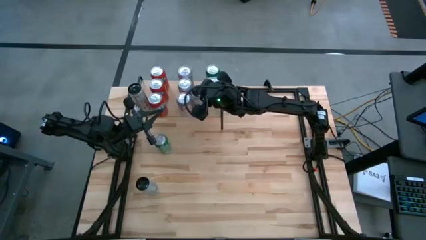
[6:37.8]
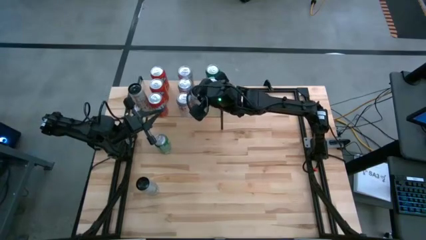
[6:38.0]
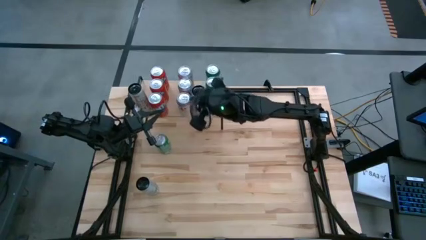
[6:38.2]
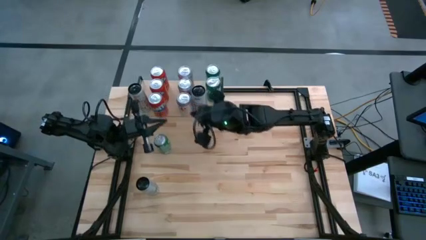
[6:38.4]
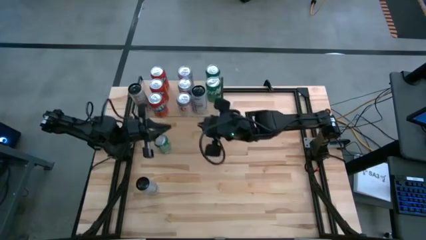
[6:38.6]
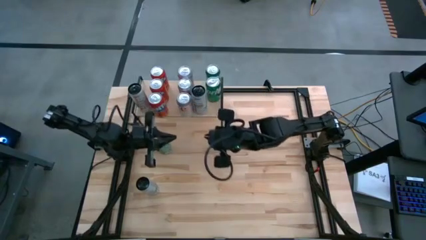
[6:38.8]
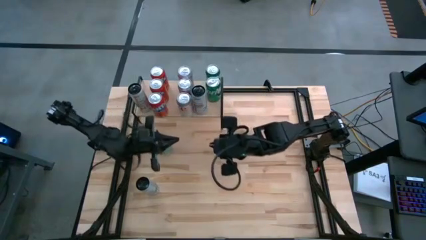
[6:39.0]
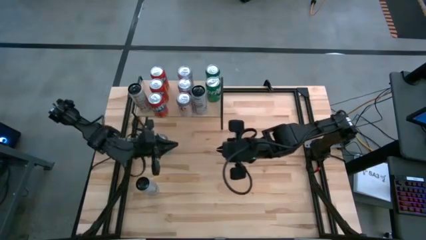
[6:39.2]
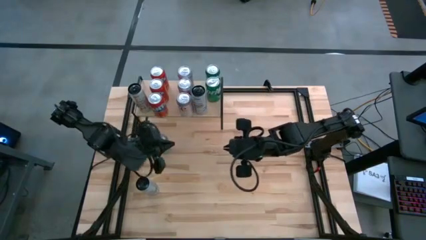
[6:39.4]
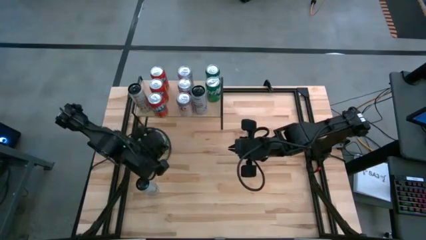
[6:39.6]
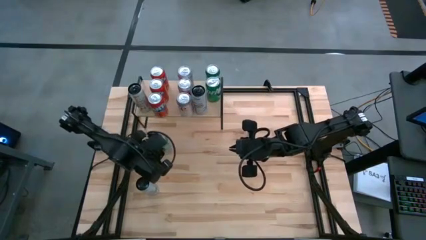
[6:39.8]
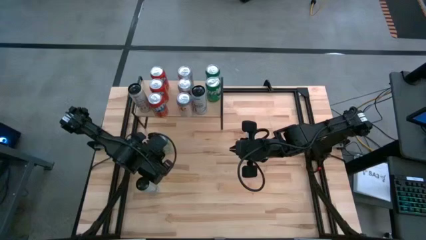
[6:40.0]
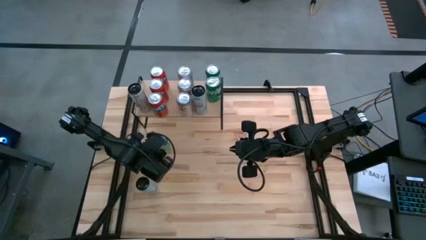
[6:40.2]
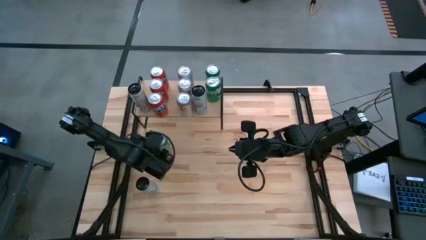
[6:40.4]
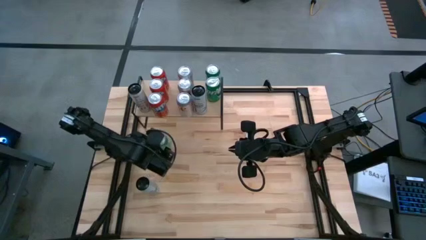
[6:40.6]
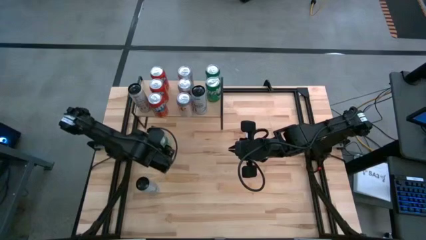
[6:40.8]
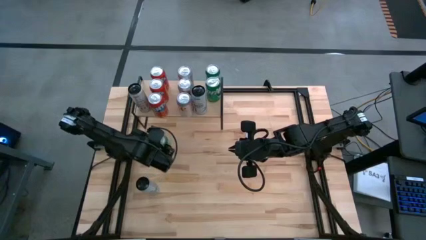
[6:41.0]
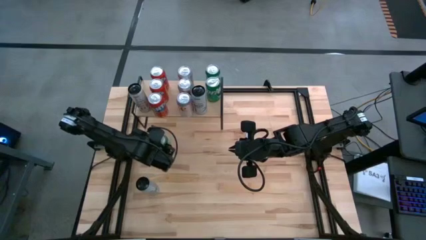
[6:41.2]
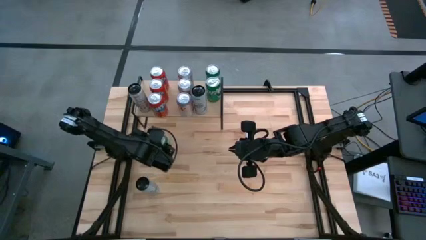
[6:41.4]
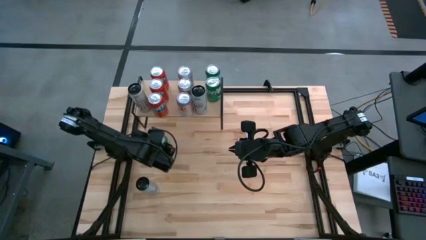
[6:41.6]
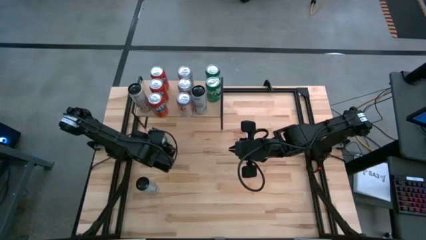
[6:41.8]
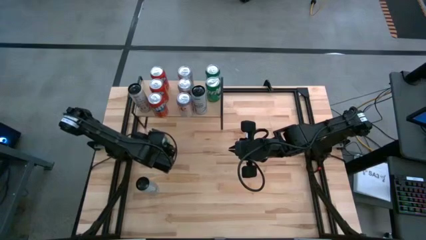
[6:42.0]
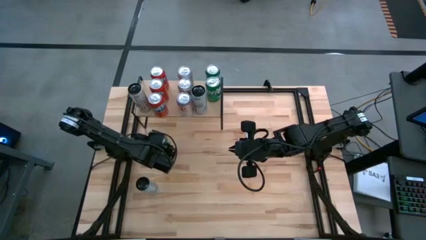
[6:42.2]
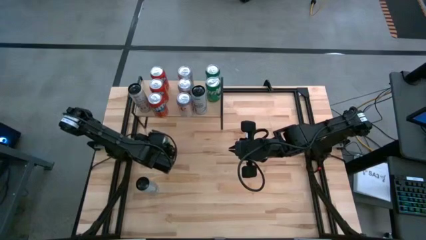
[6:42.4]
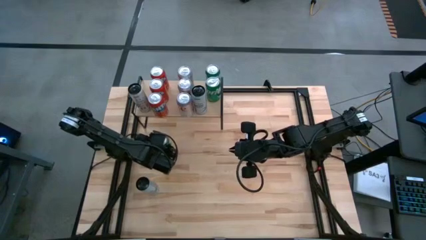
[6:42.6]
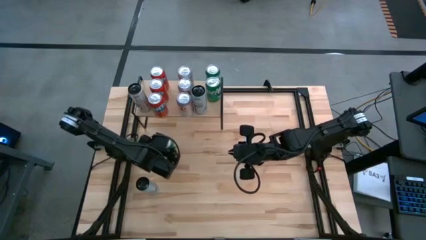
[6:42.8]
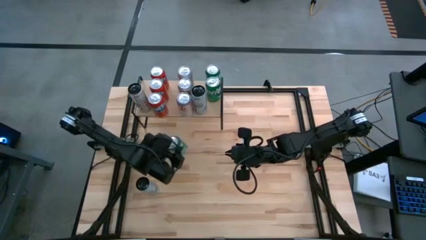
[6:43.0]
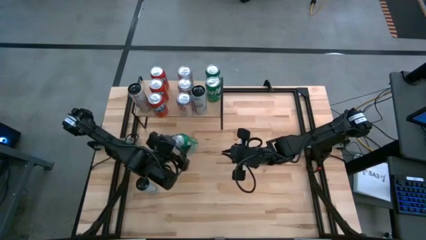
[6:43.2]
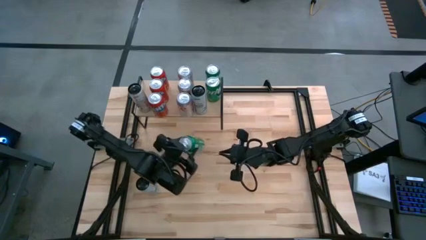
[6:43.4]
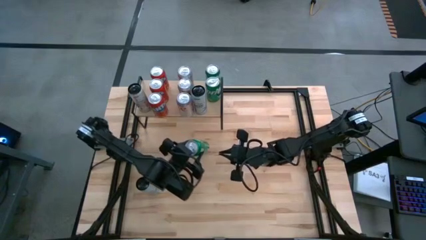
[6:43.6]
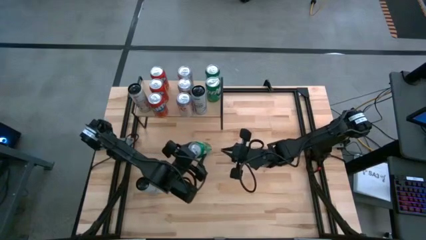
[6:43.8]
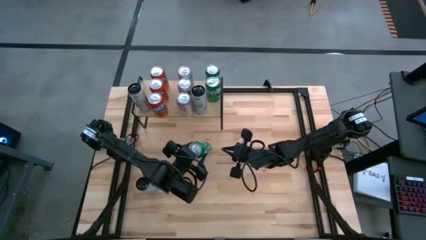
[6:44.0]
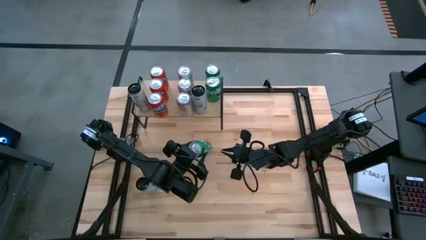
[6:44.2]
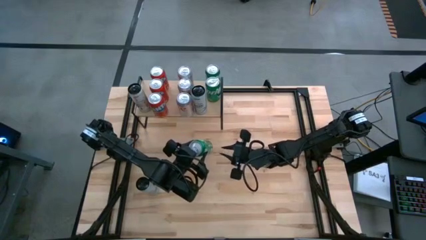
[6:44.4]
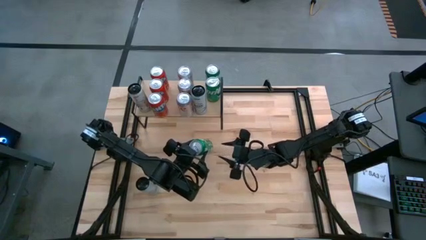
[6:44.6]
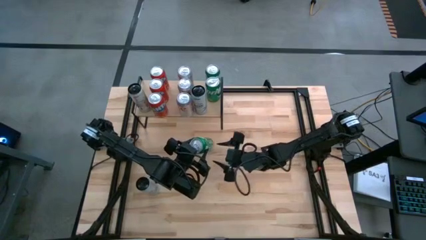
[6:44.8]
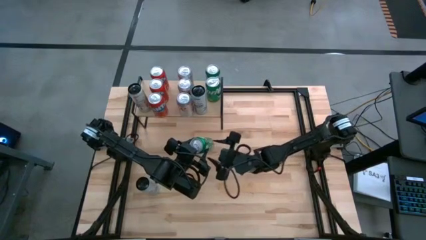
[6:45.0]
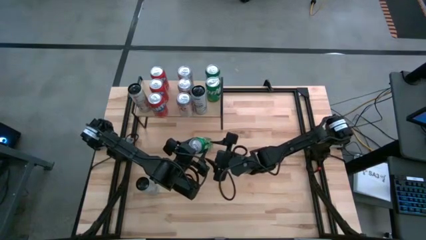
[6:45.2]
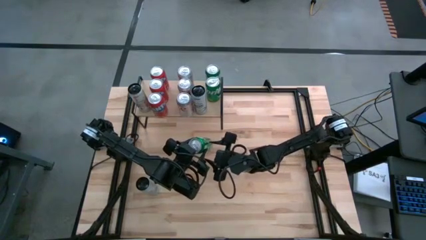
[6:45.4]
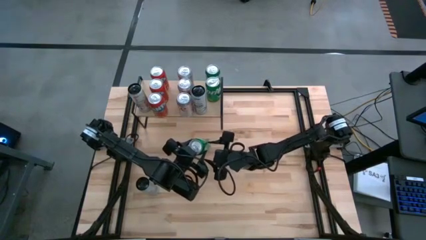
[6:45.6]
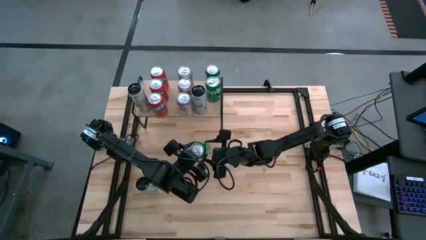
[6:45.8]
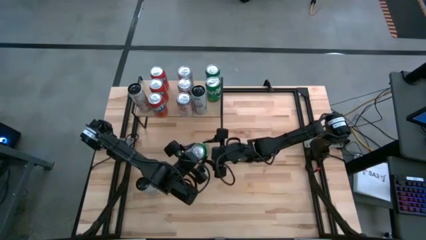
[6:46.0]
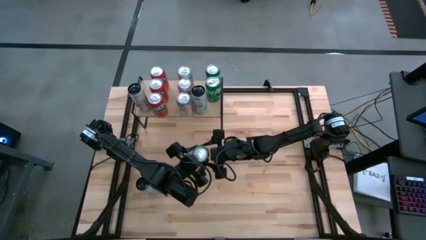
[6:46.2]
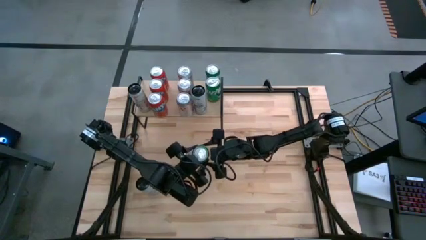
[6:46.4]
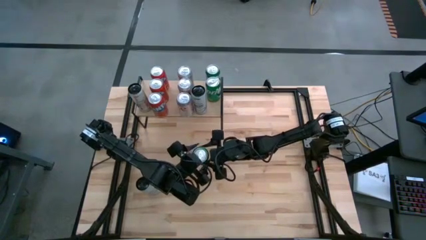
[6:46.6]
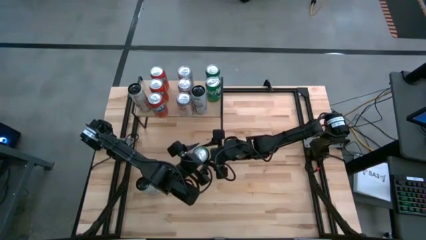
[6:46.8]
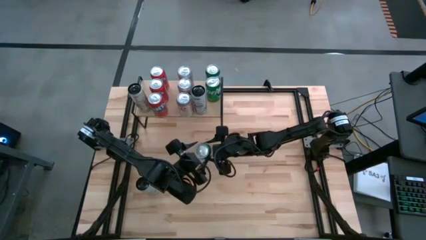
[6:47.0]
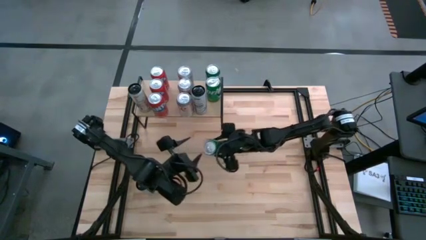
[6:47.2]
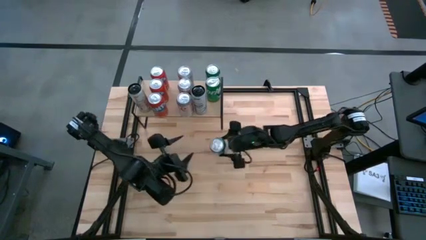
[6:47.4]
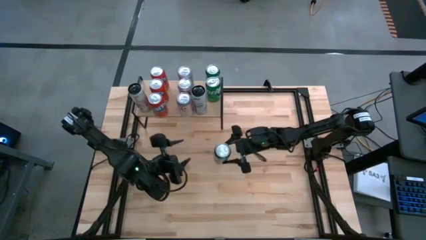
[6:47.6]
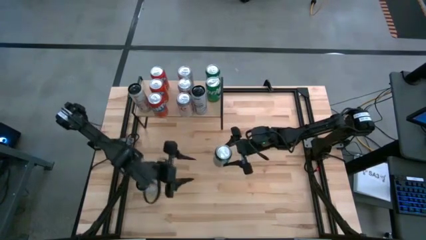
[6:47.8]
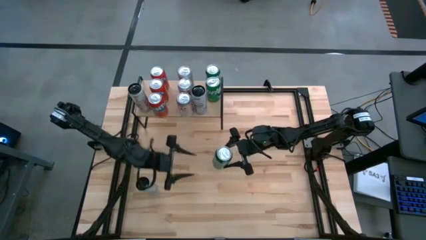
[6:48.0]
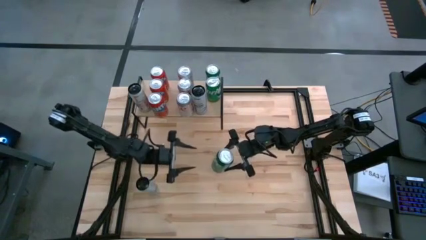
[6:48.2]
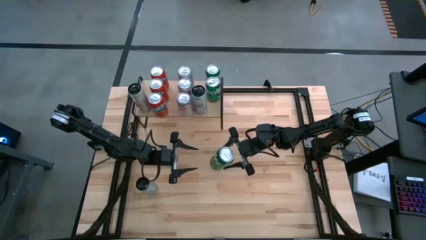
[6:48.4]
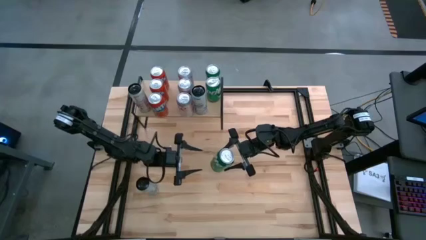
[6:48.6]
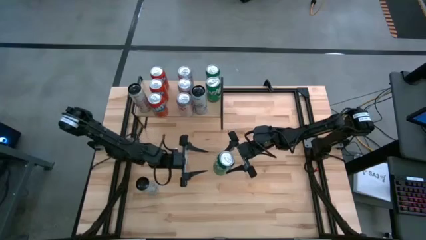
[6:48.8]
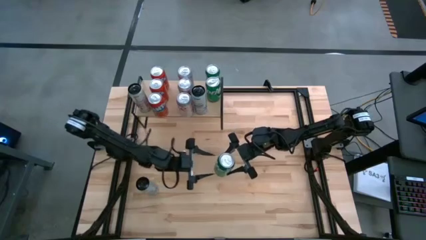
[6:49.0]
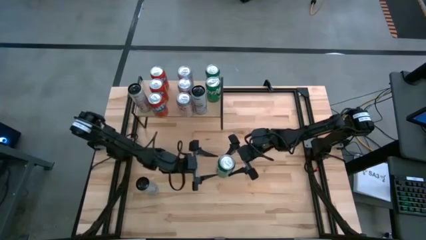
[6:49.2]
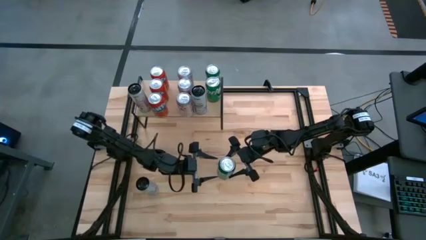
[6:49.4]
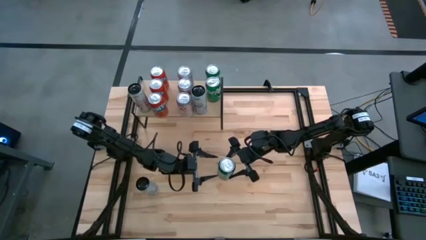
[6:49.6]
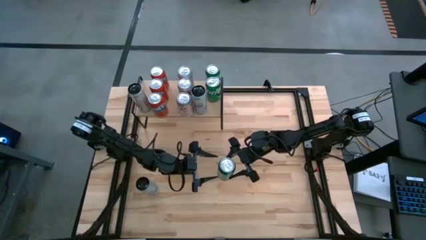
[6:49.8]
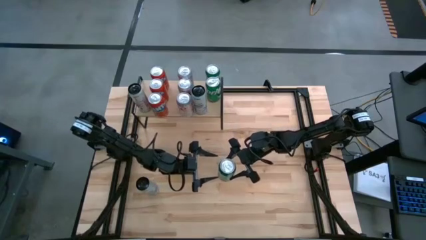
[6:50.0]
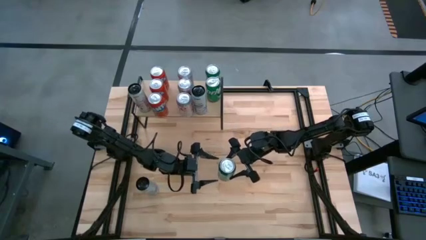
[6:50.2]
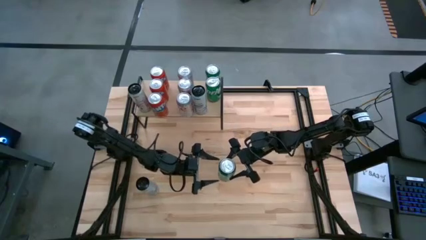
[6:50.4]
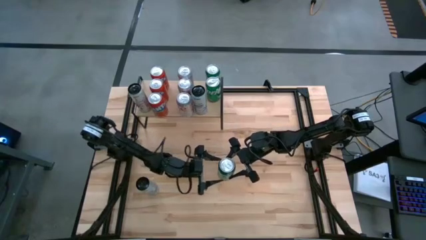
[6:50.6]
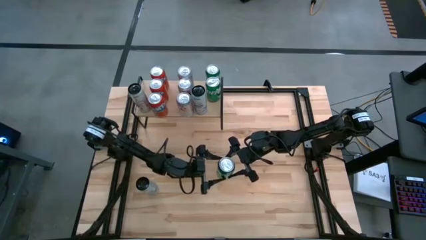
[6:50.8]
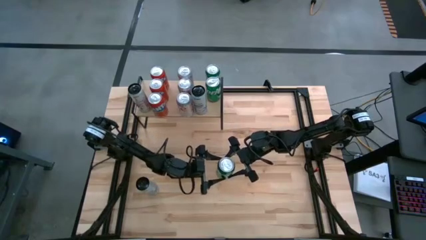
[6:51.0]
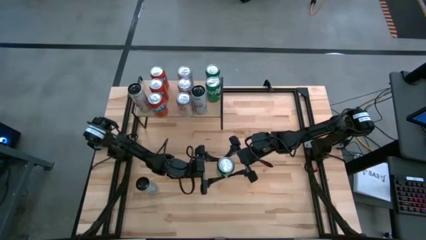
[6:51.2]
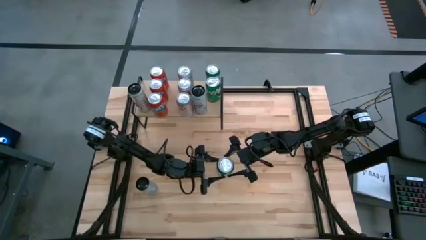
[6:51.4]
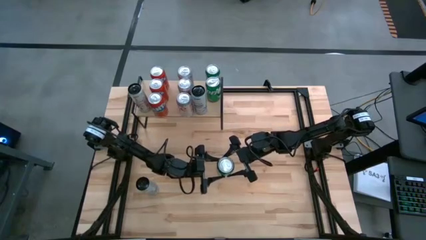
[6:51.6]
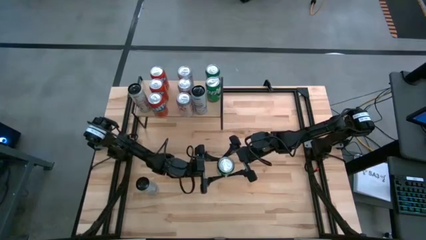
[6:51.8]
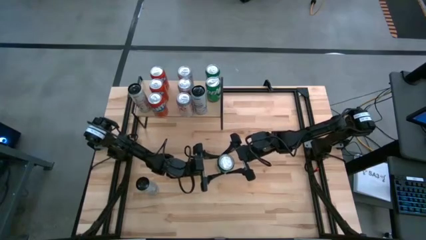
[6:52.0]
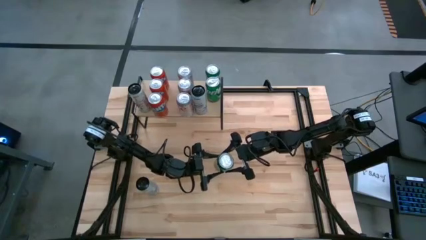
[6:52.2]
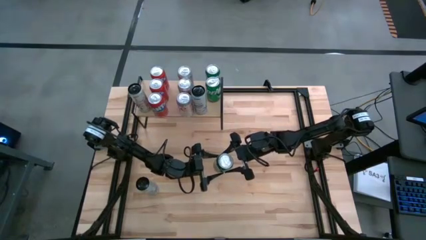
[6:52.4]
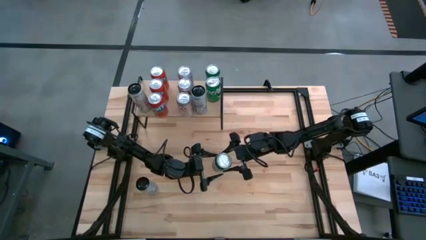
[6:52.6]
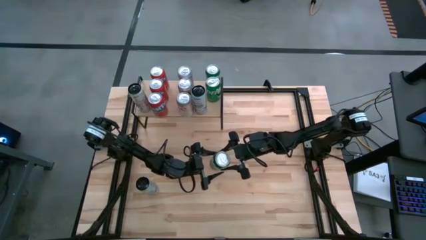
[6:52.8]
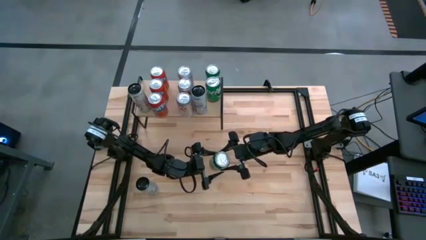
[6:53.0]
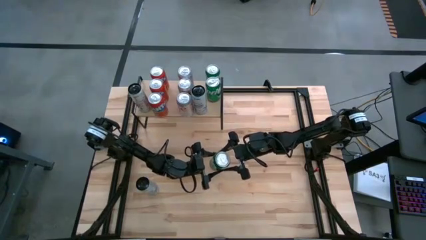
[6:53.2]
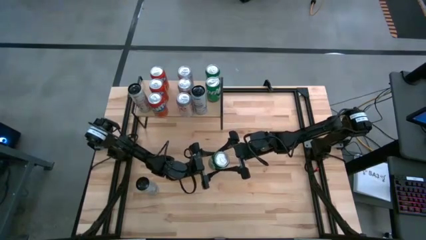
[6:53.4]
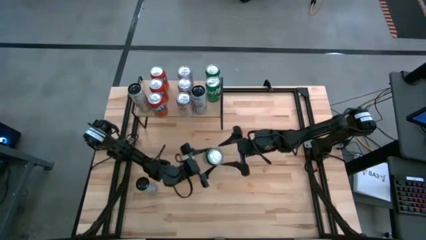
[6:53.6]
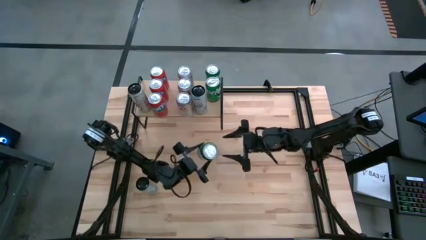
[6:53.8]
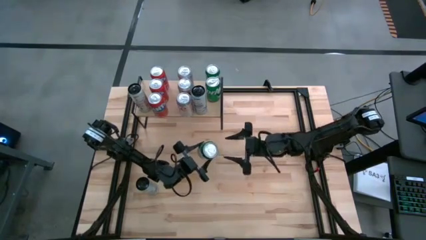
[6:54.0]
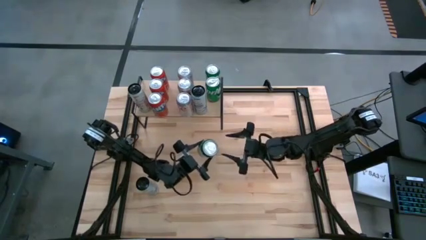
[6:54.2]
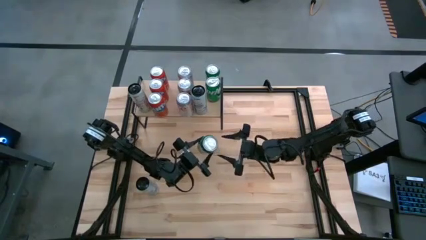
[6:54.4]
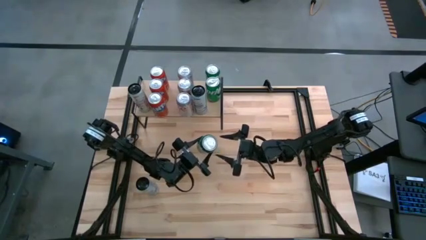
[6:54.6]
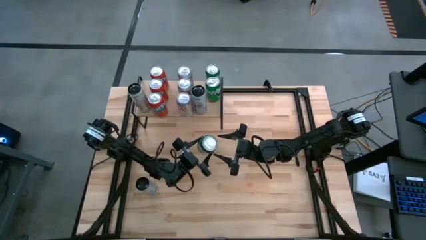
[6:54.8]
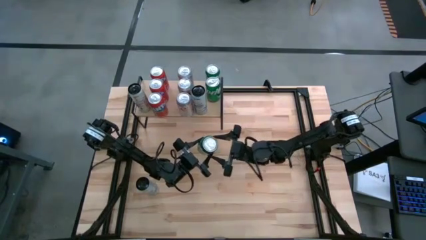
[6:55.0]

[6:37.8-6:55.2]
Task: Place canned beverage on shelf
Put the green soda can aligned with the other green soda cans on the shelf
